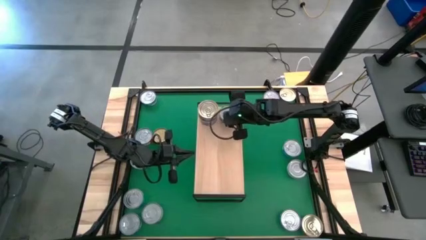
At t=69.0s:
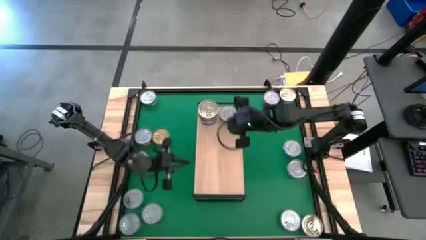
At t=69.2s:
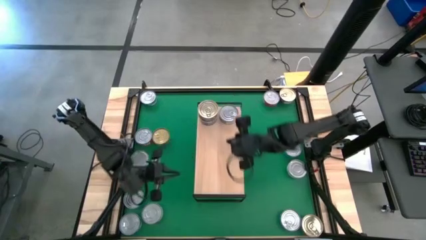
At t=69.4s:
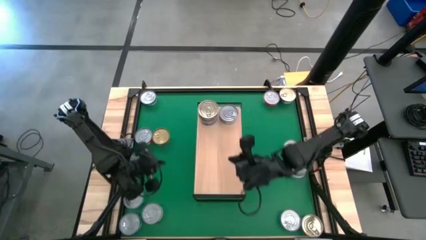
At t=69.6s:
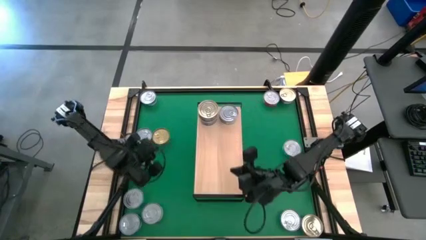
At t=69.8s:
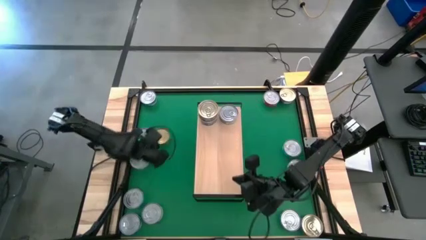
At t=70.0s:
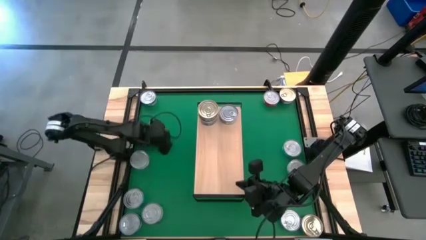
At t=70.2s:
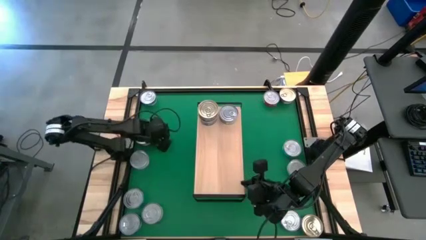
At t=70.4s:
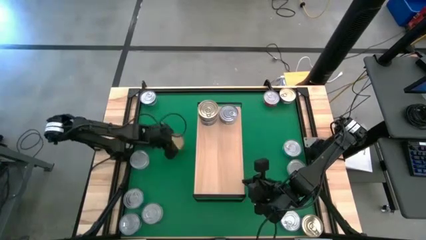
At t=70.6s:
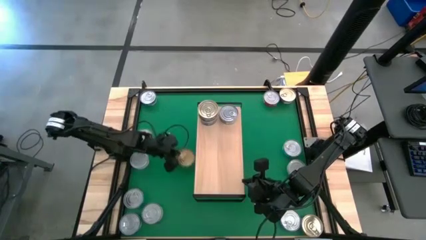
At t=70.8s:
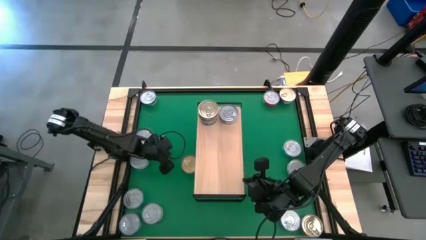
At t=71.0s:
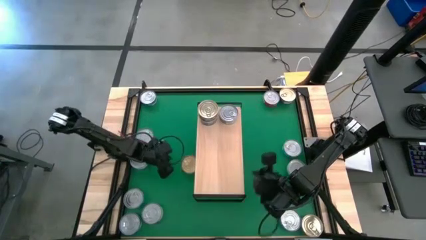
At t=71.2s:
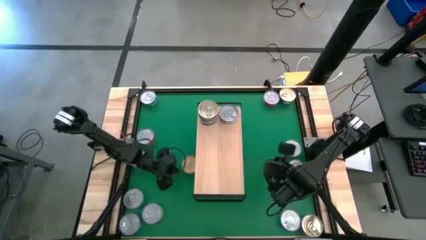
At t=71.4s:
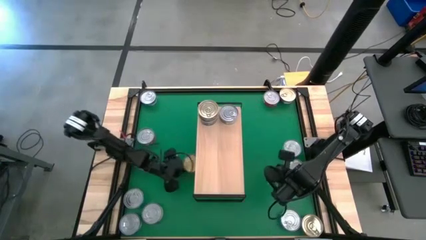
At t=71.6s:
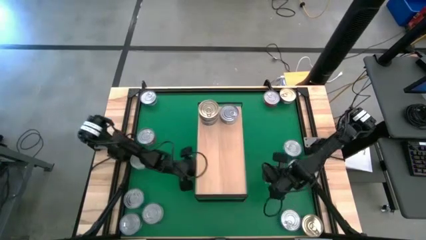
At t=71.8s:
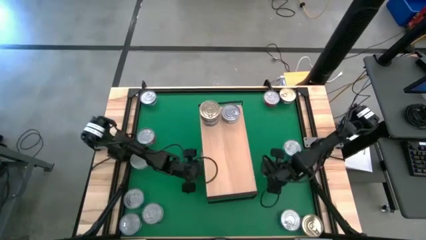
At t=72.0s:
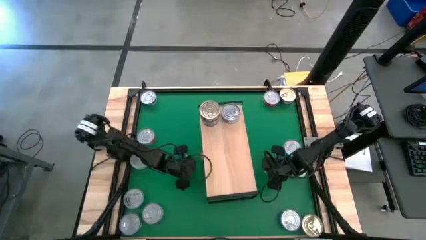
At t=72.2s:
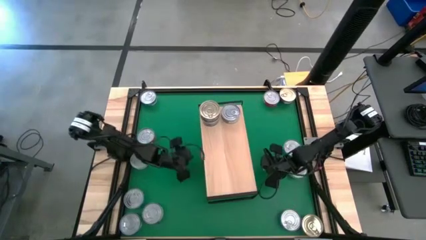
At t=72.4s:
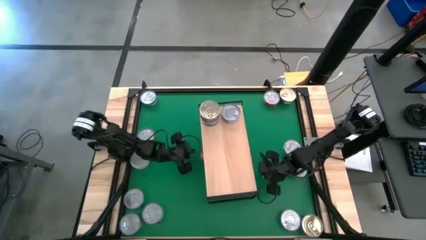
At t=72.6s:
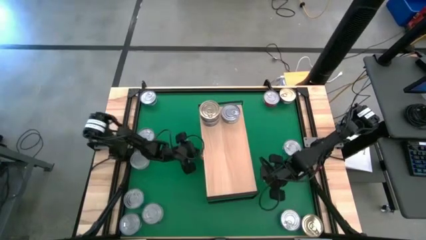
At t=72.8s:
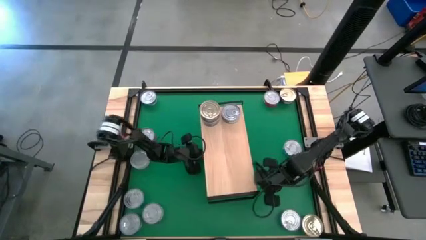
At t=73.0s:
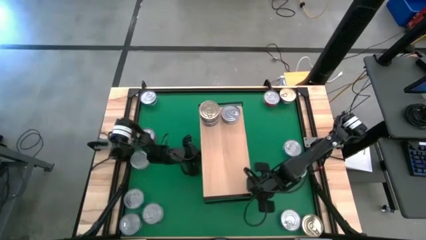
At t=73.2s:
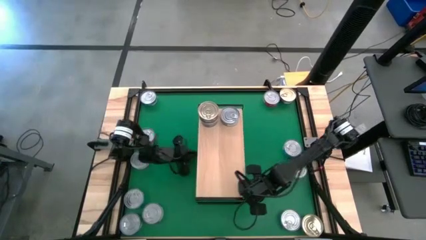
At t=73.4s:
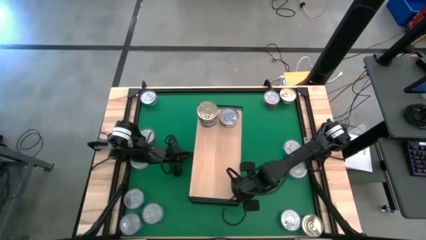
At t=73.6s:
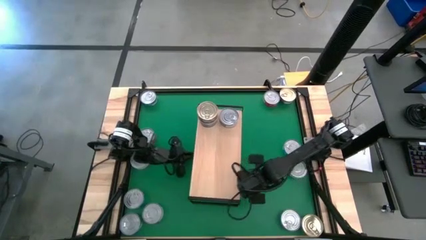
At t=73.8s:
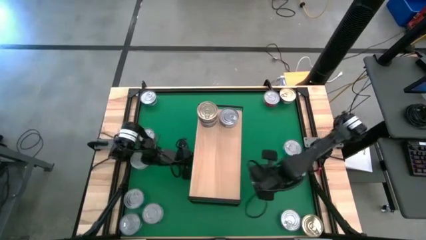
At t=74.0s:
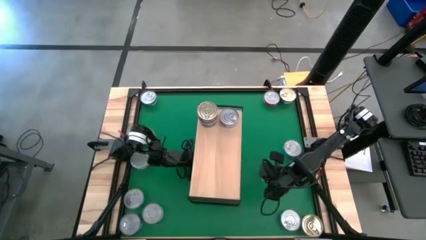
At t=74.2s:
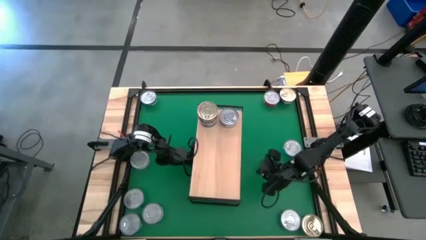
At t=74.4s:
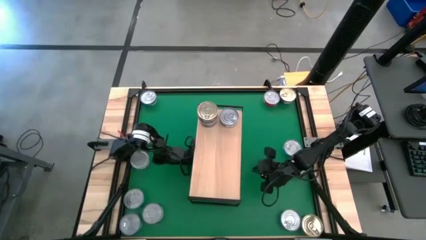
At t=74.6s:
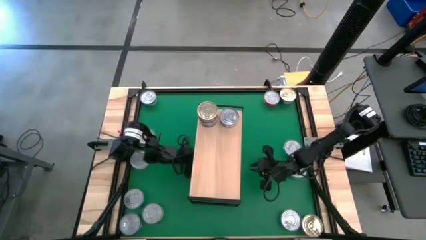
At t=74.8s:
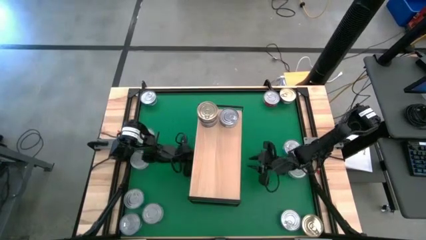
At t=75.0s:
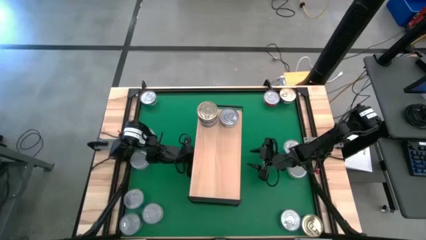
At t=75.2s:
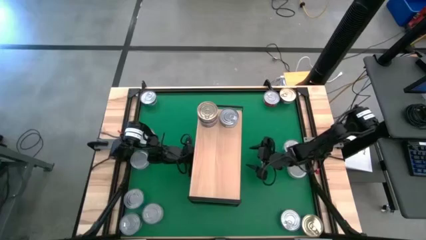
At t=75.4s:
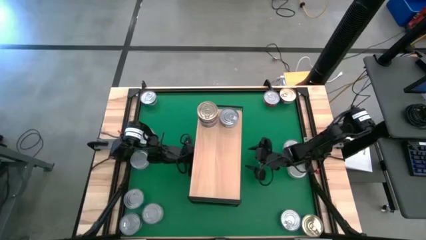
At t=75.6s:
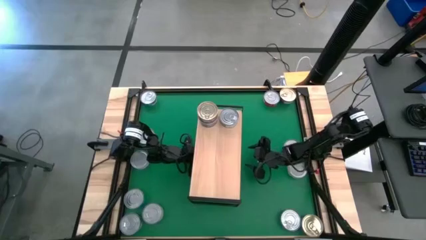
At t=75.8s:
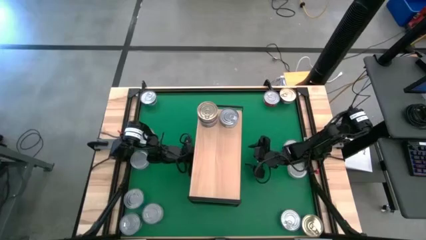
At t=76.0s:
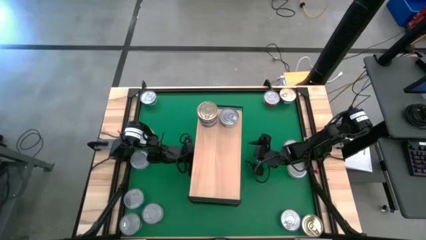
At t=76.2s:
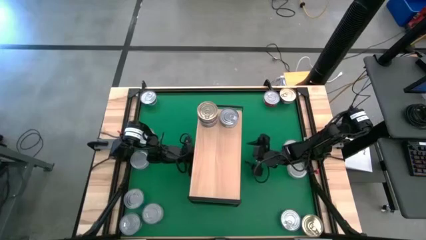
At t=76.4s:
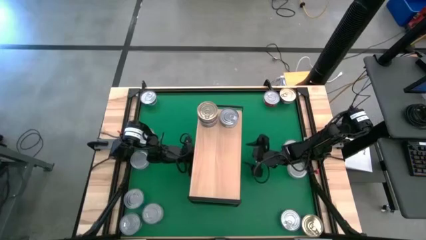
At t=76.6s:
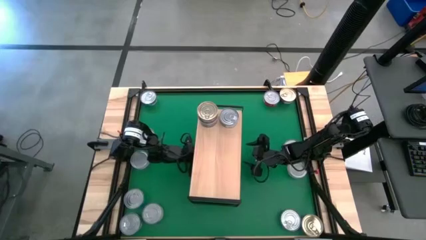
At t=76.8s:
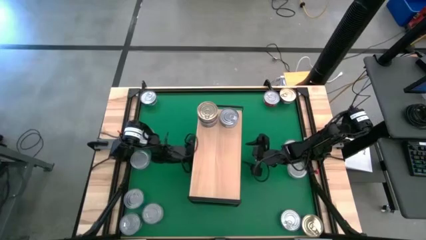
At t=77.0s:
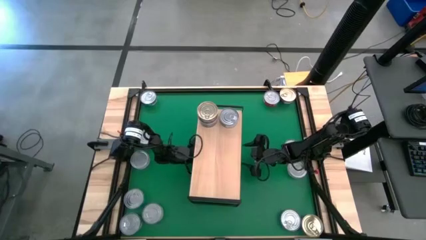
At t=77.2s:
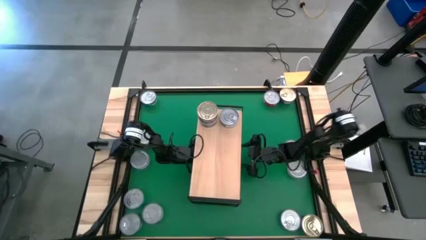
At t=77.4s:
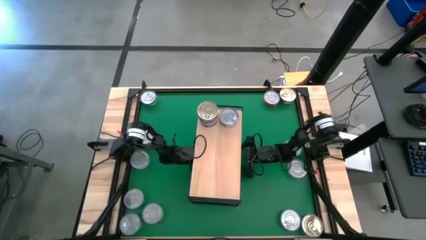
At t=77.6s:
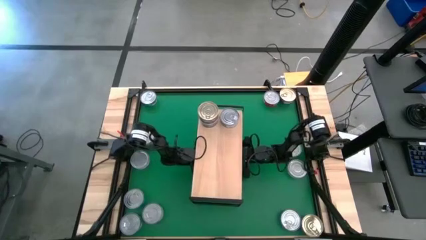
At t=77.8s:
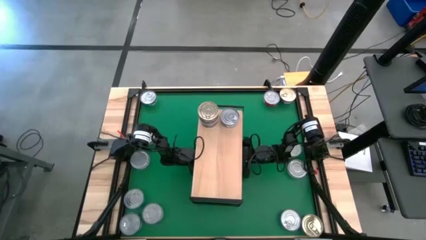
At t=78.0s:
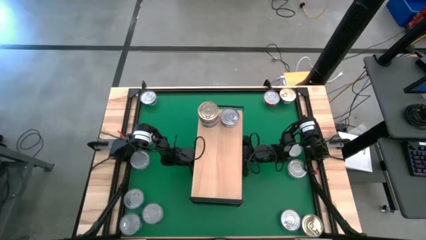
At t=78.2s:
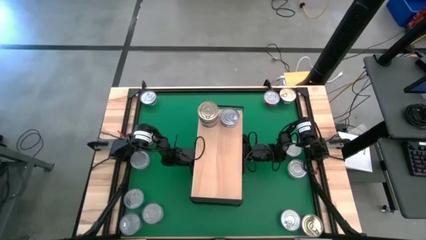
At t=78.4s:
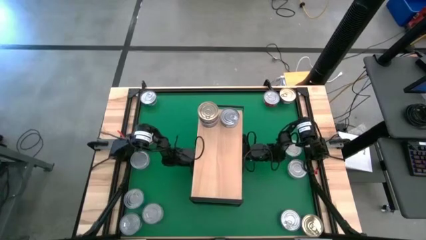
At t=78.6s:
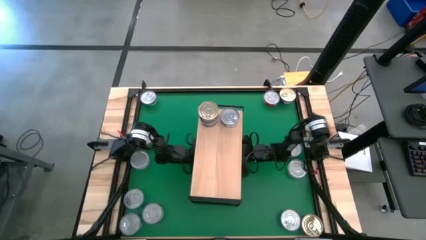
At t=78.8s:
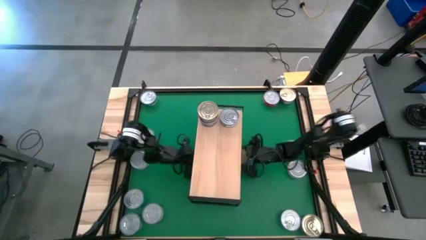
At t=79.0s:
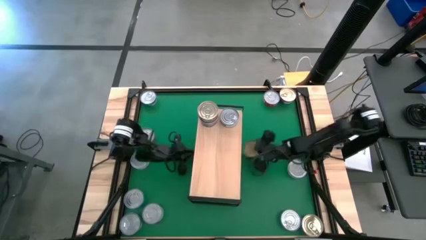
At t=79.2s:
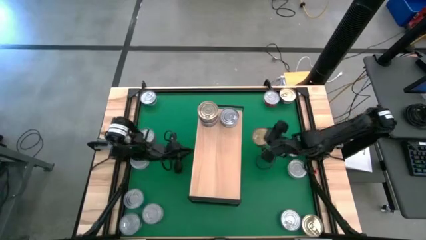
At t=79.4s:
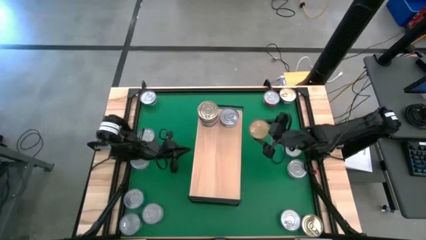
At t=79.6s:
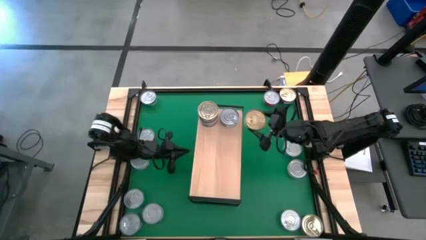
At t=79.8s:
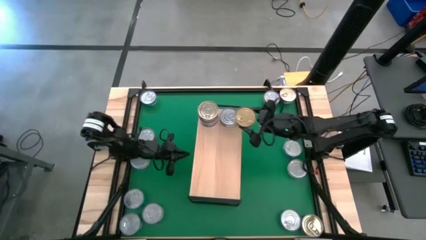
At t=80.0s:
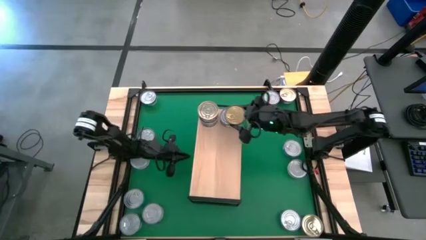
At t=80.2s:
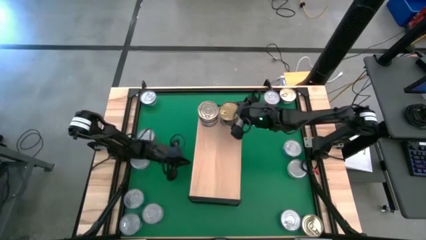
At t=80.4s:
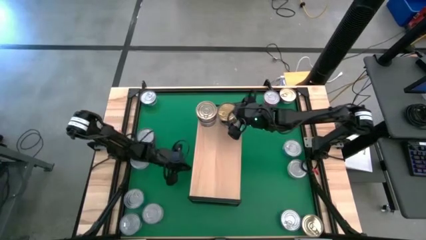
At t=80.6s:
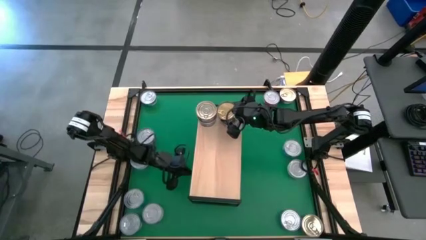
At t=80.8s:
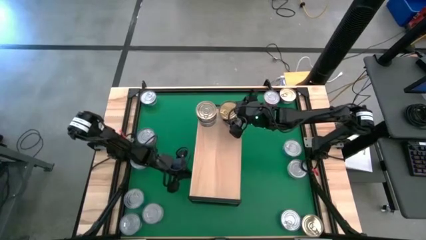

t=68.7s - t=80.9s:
Task: Stack canned seafood by type on shelf
Stack the green tuna can on top of the other green tuna can on the shelf
